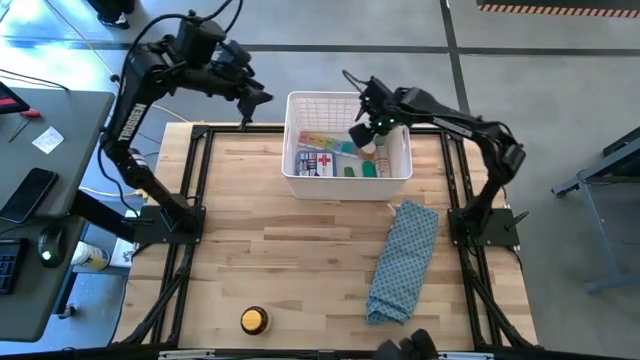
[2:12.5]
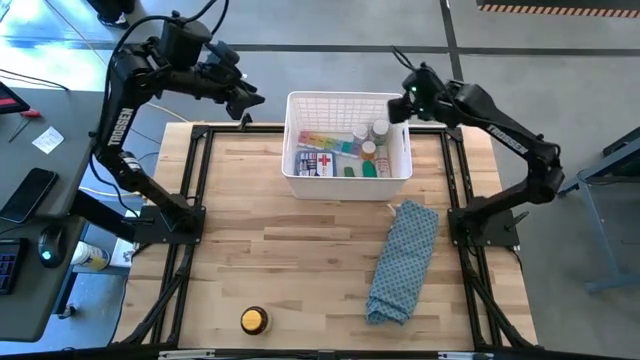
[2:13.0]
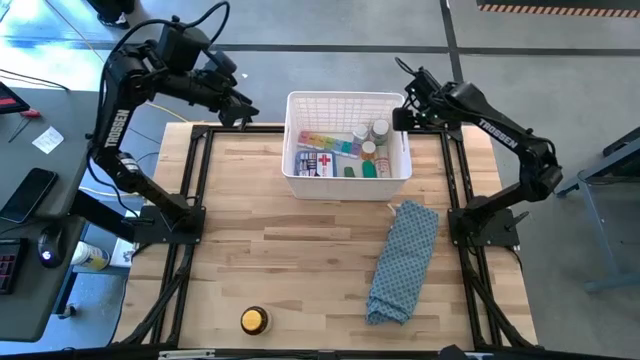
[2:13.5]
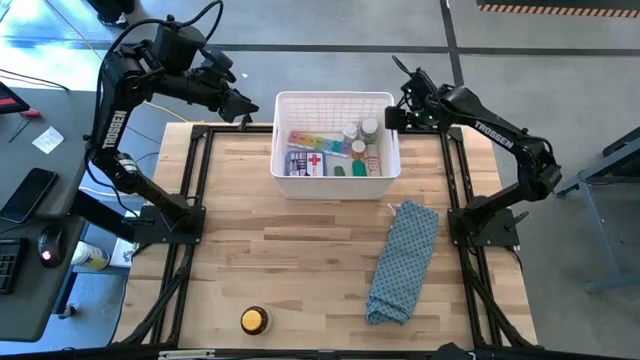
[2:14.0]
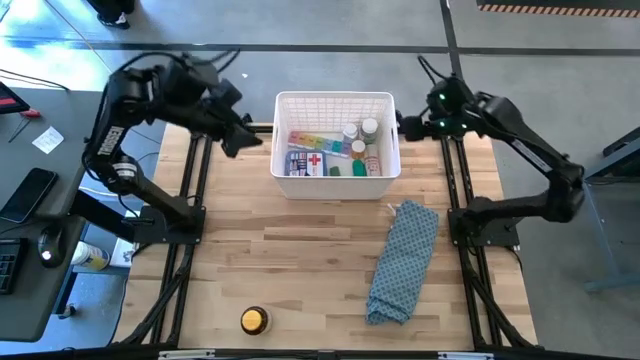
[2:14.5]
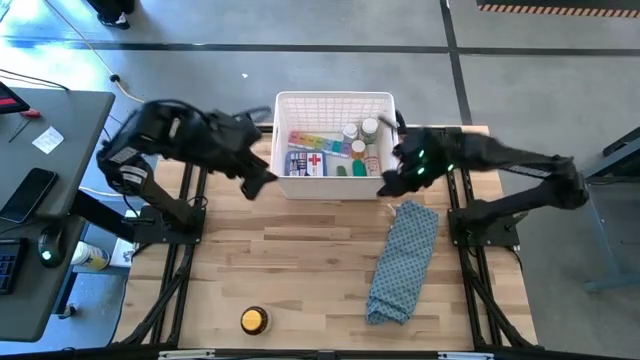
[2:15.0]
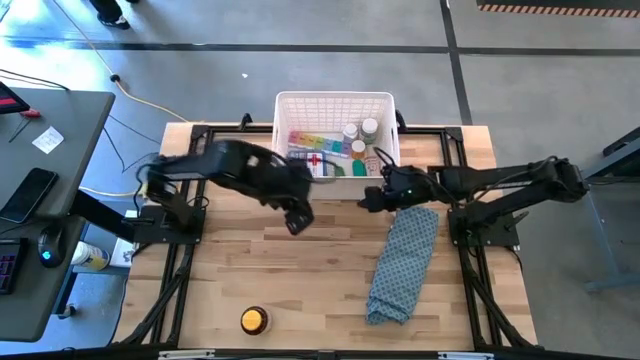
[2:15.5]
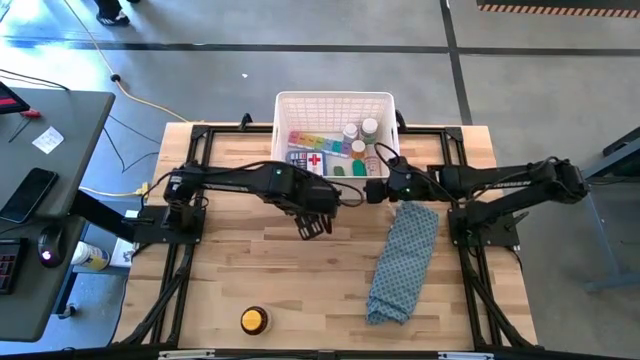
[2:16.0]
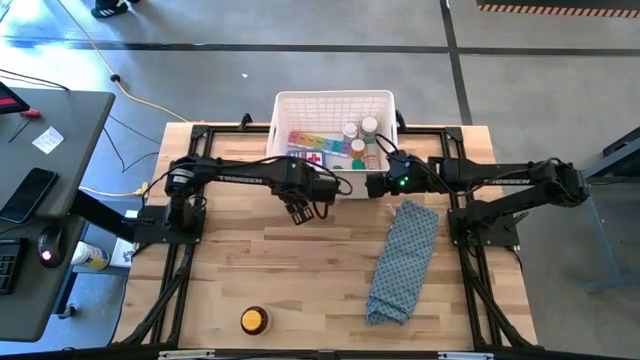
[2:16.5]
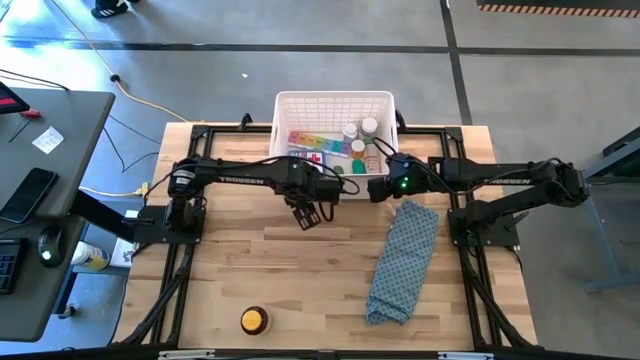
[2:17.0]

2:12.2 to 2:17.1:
Task: Pick & place medical supplies in basket/bin
Adjust the white bin

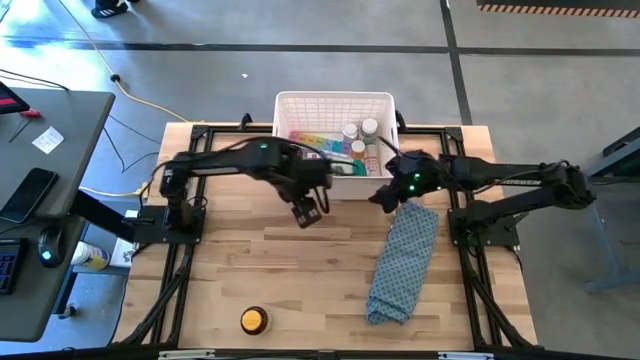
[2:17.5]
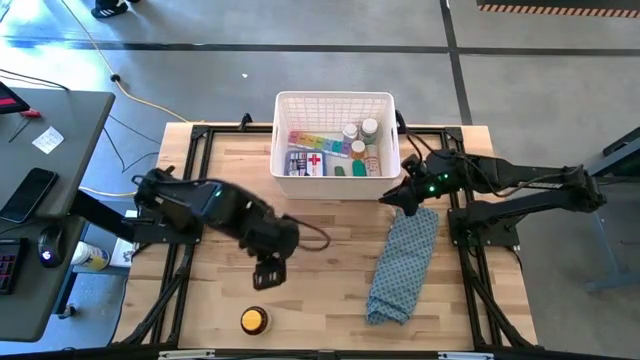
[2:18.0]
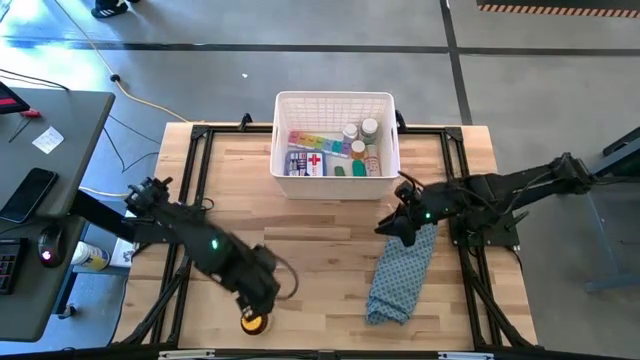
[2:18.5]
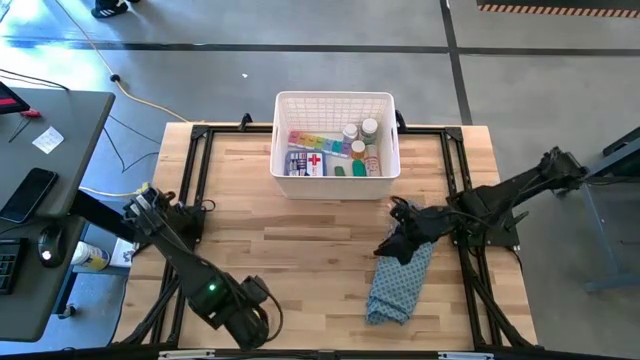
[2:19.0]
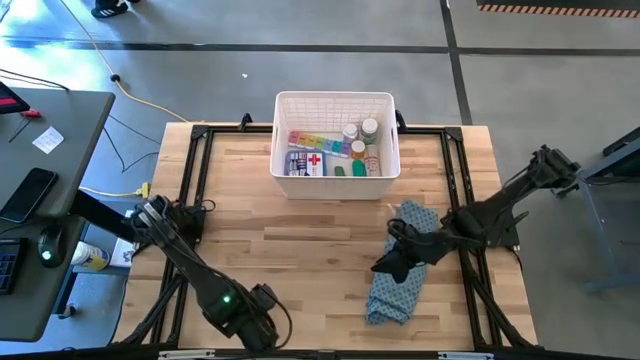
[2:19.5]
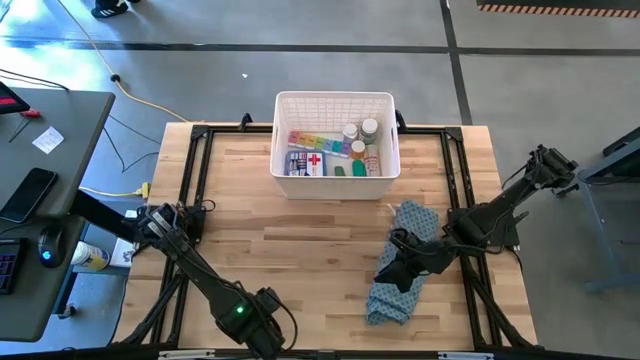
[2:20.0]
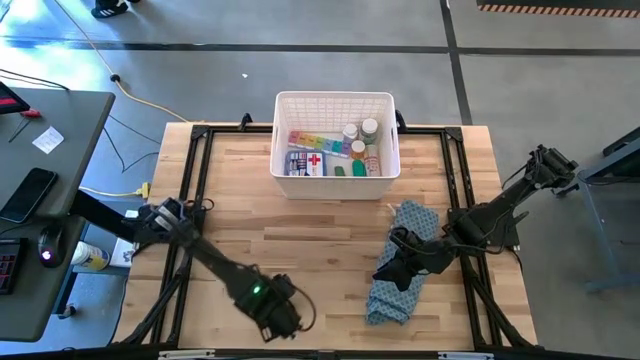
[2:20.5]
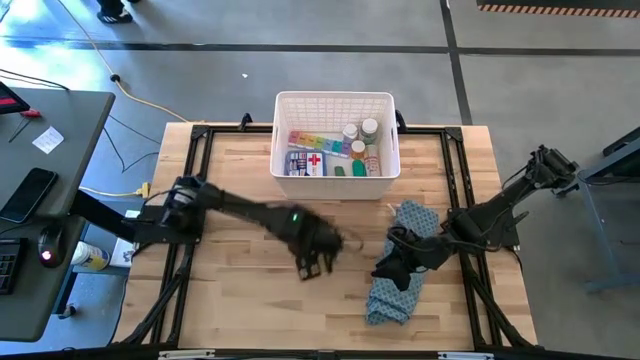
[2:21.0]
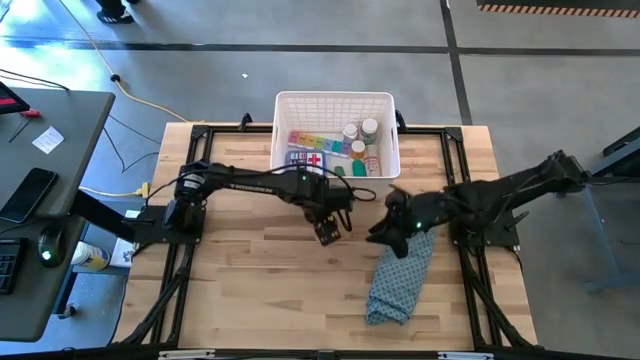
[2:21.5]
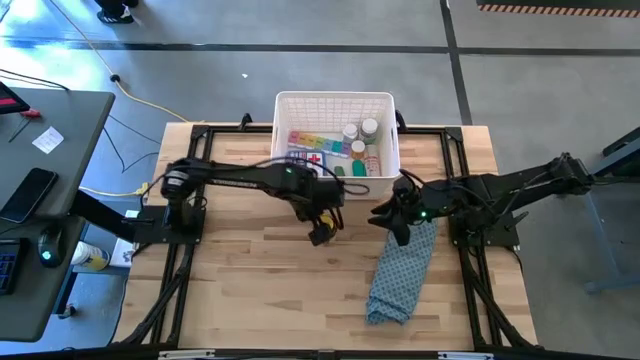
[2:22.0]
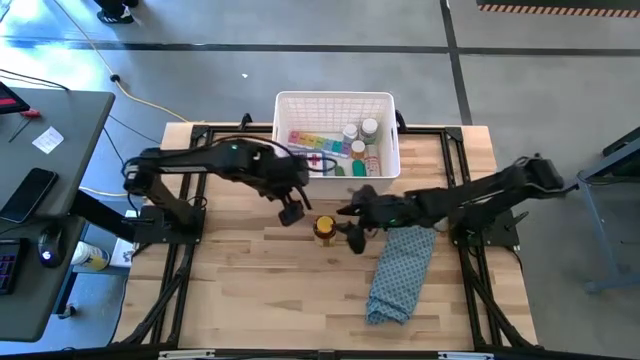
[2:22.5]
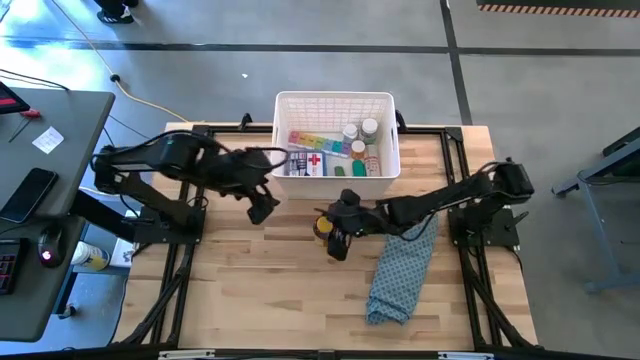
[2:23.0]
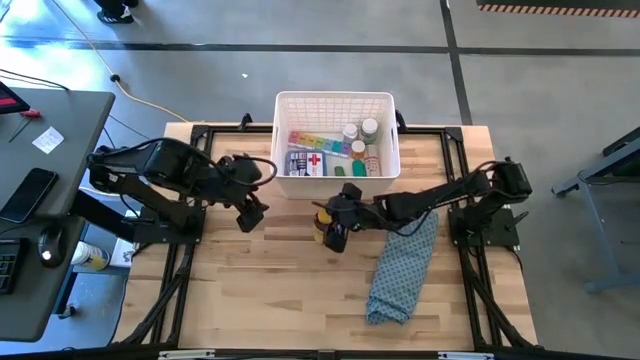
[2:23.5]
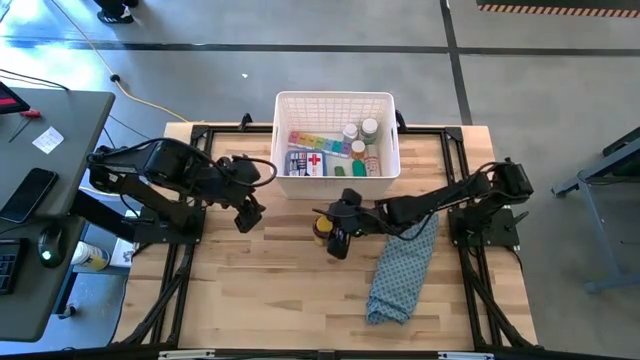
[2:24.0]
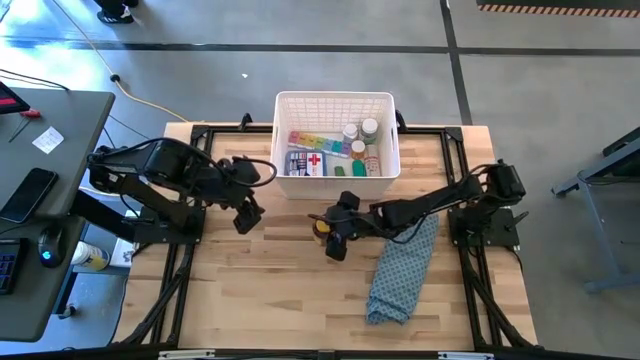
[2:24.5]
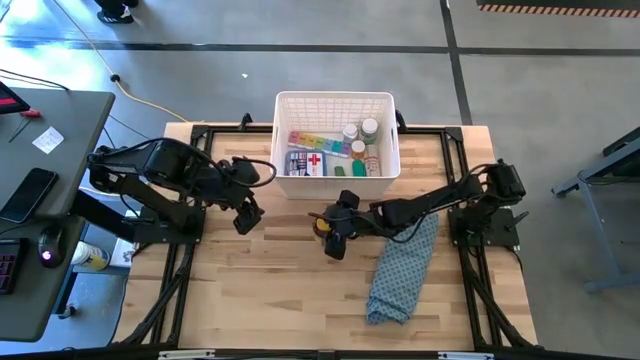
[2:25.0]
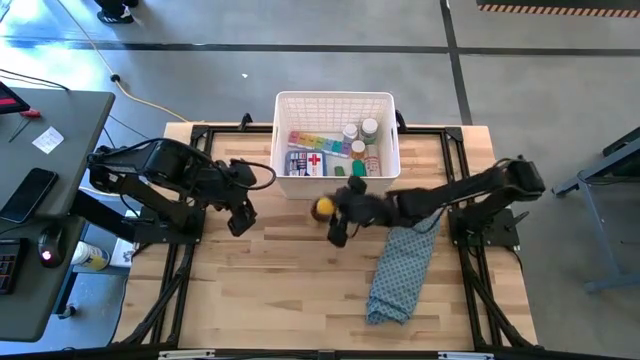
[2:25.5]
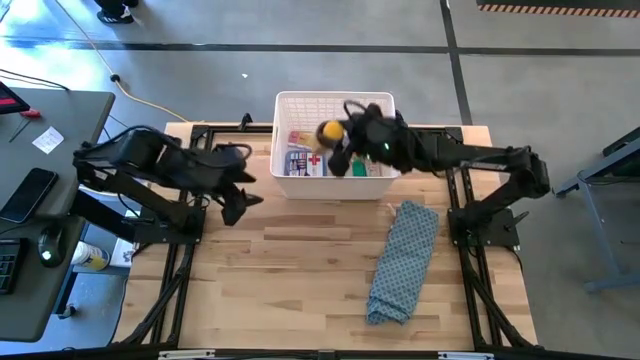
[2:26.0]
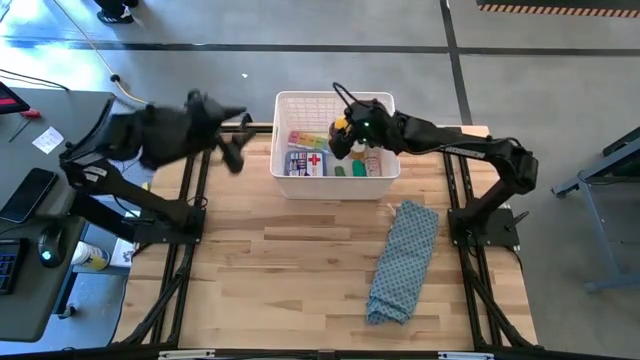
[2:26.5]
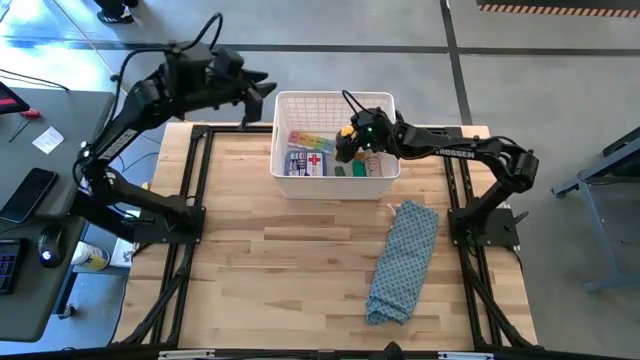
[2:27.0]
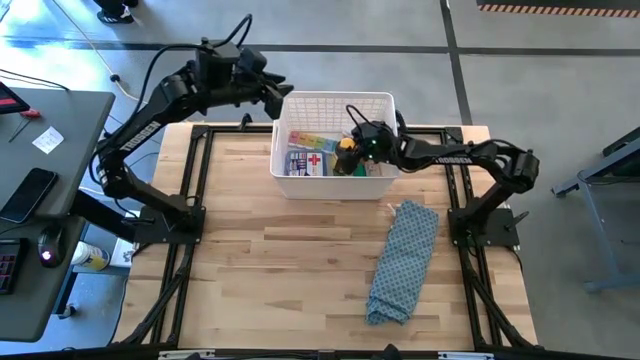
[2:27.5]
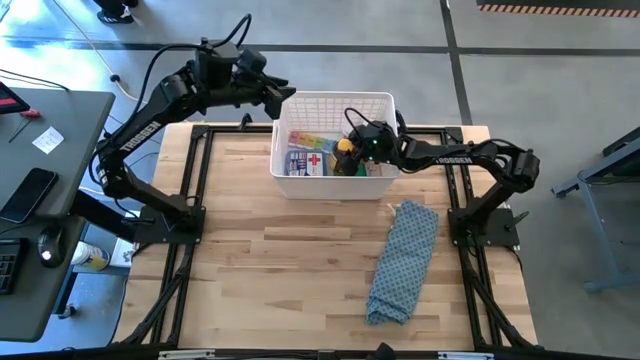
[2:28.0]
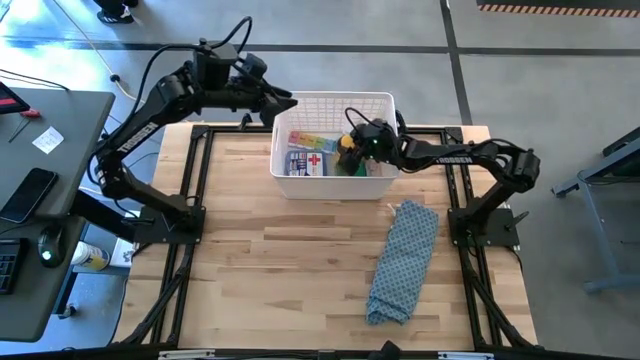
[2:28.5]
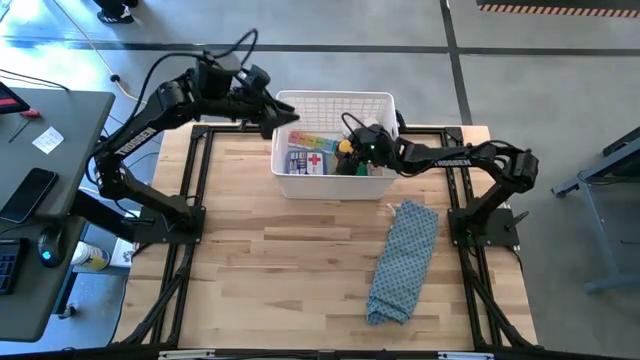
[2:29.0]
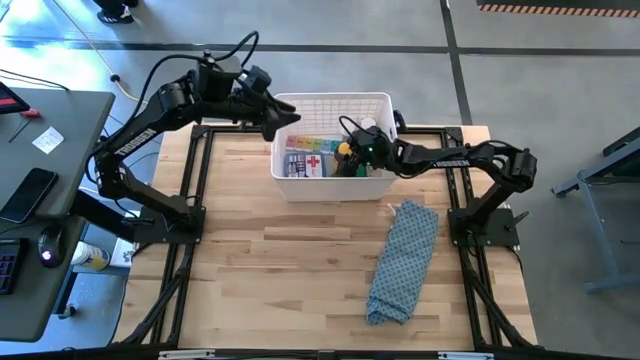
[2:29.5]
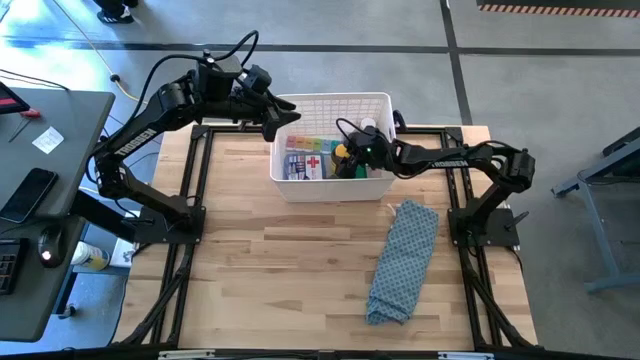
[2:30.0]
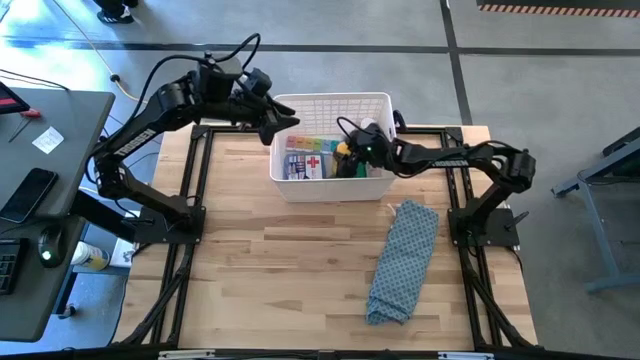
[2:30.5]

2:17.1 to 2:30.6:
Put the yellow pill bottle into the white bin

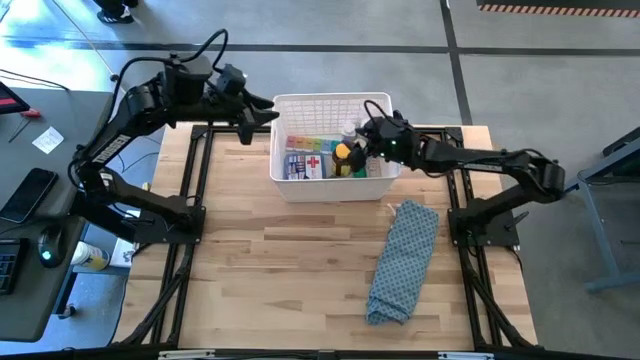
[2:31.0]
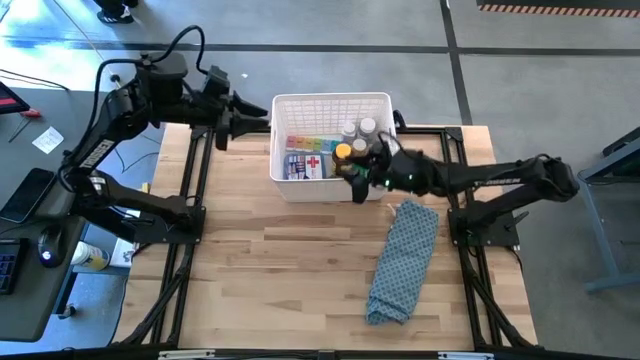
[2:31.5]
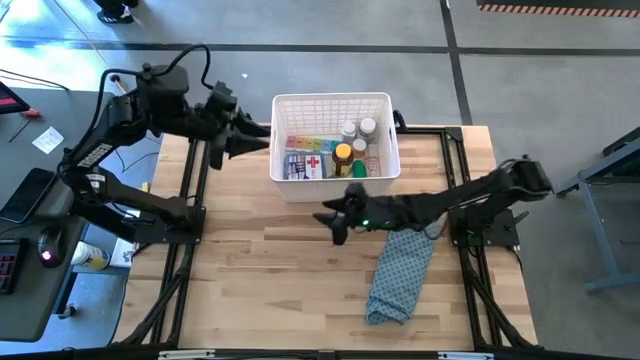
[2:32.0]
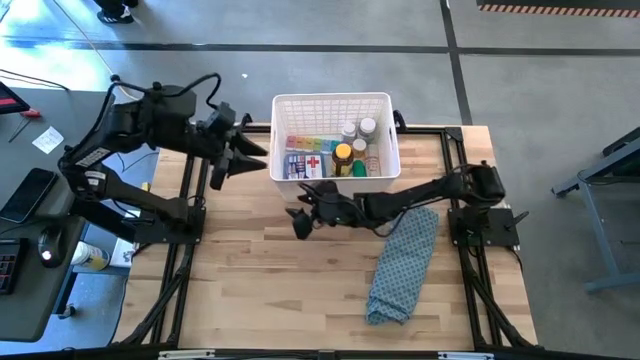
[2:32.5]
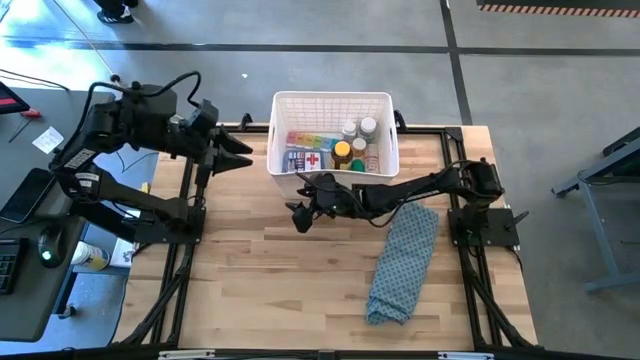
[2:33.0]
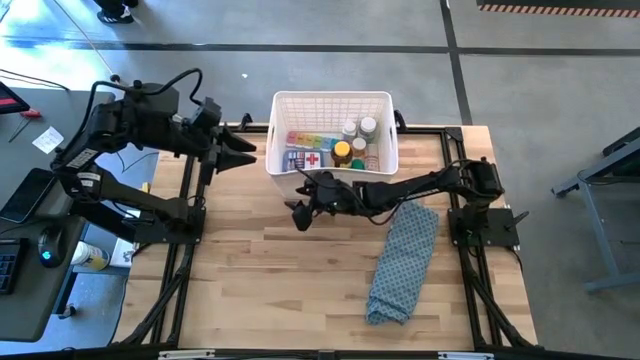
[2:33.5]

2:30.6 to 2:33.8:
Adjust the white bin

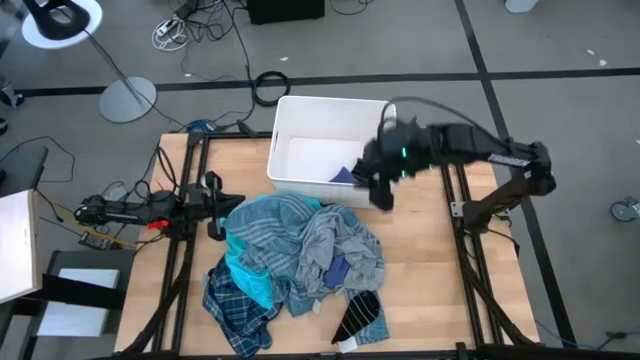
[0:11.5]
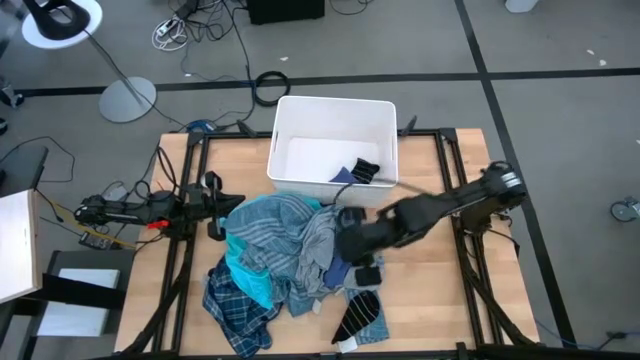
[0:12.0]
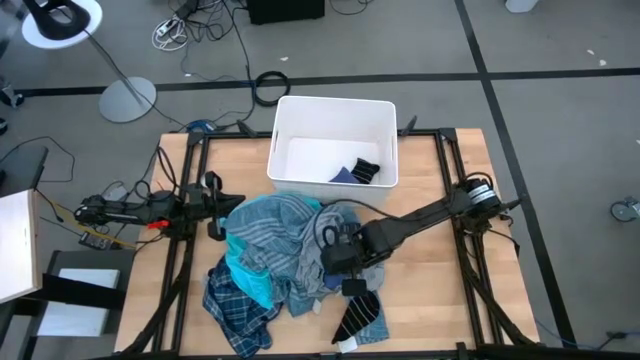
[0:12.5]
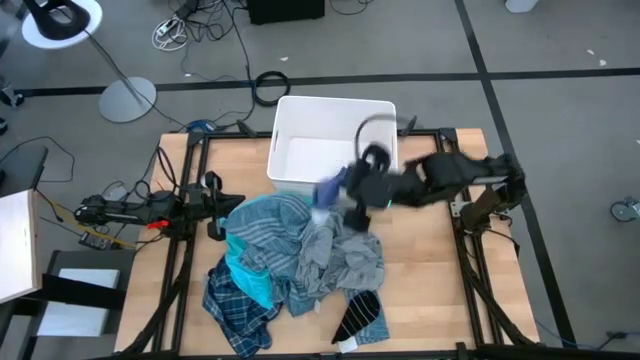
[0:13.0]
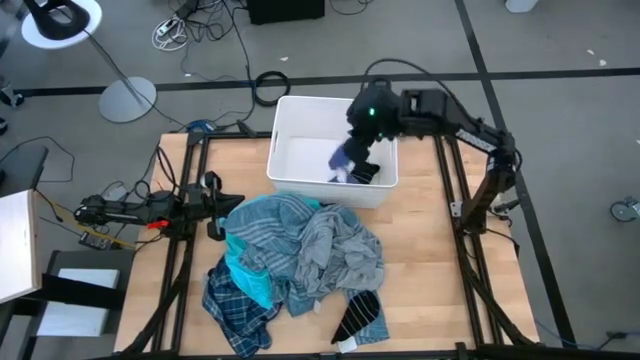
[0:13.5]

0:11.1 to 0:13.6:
Task: Sort clothes
Put the blue sock into the white bin
